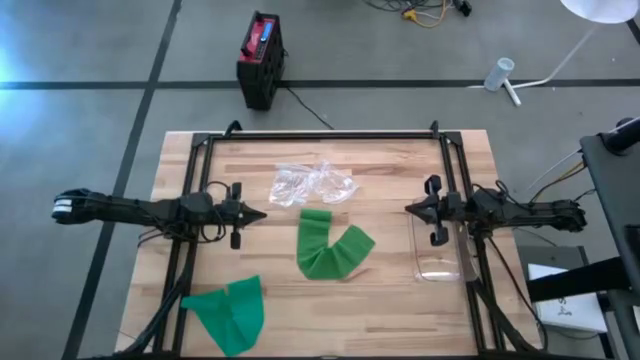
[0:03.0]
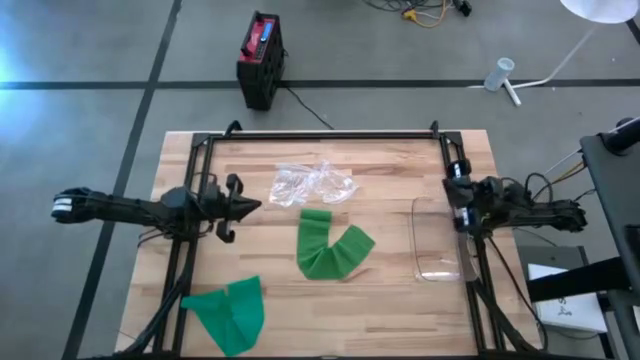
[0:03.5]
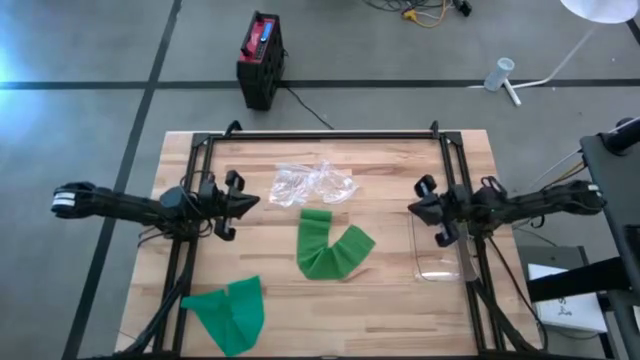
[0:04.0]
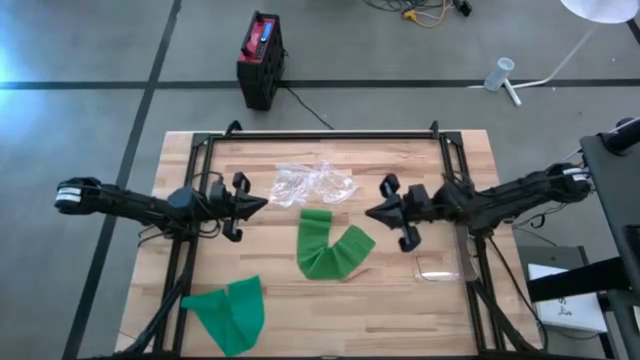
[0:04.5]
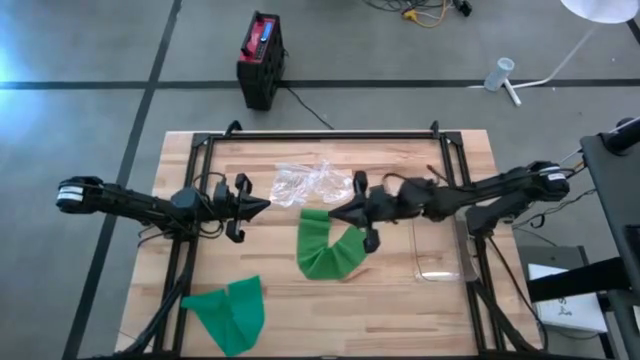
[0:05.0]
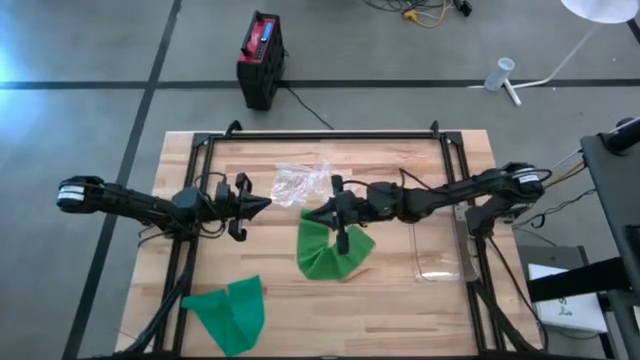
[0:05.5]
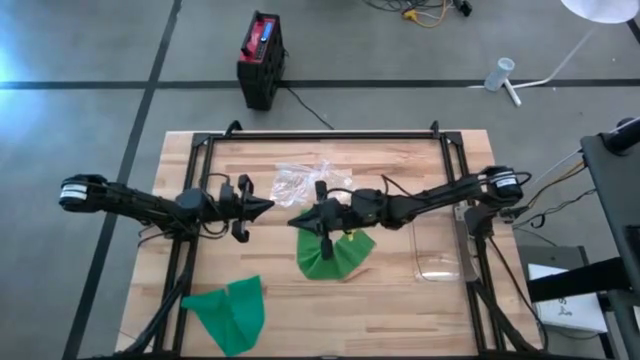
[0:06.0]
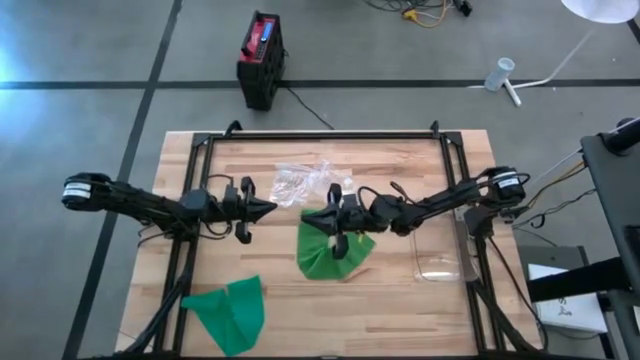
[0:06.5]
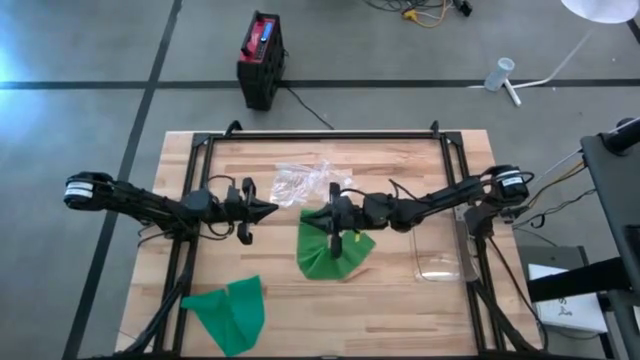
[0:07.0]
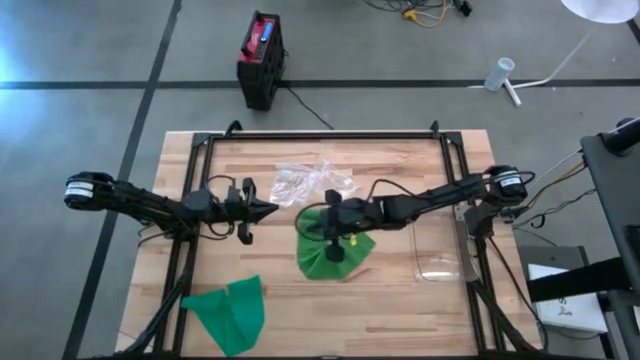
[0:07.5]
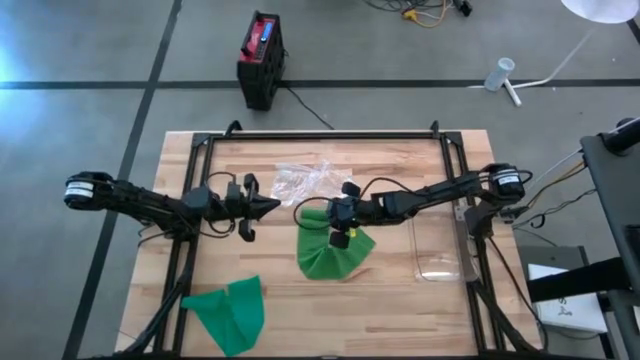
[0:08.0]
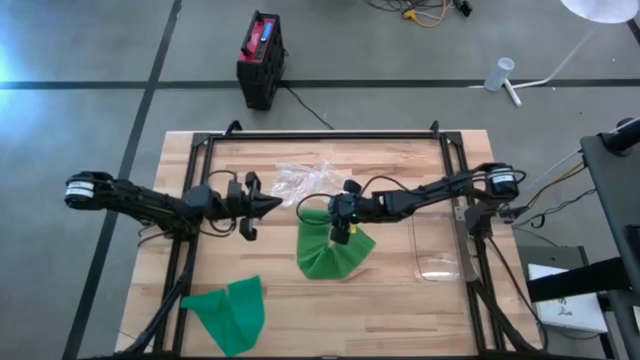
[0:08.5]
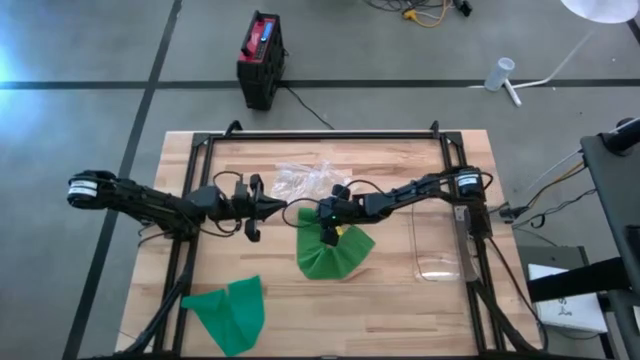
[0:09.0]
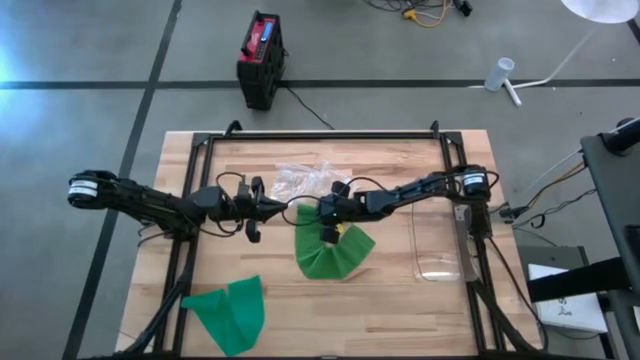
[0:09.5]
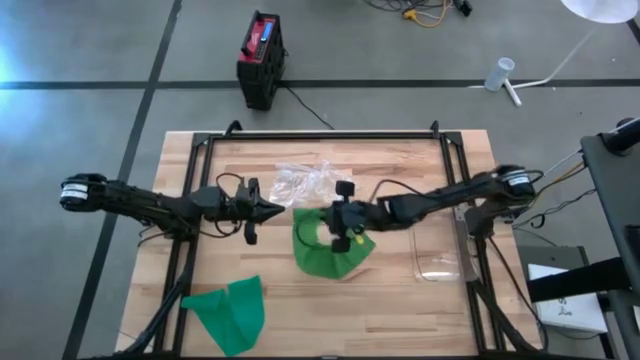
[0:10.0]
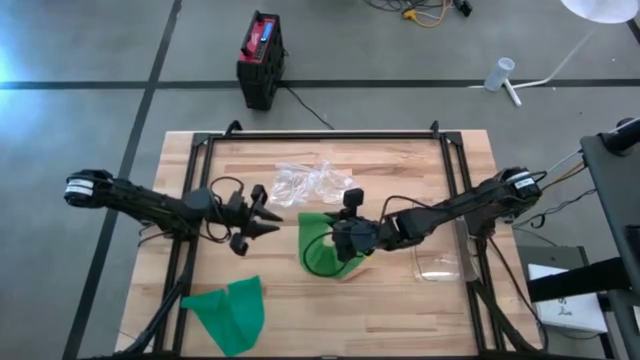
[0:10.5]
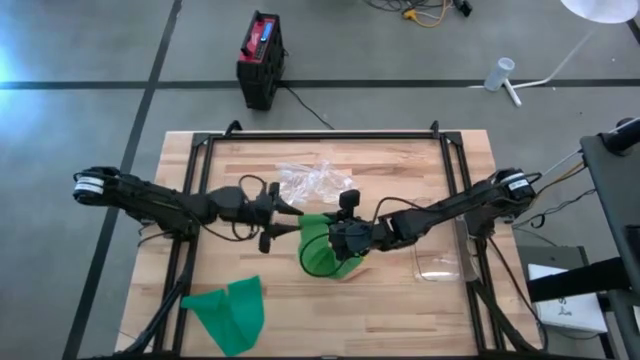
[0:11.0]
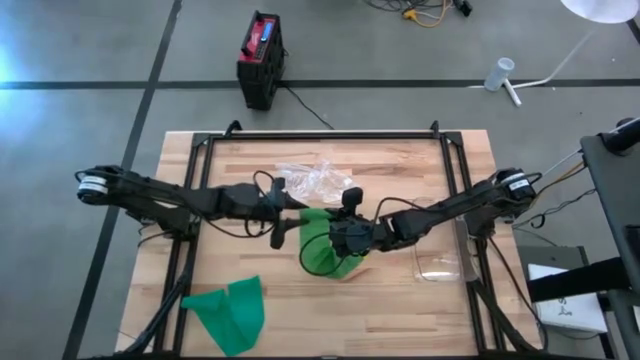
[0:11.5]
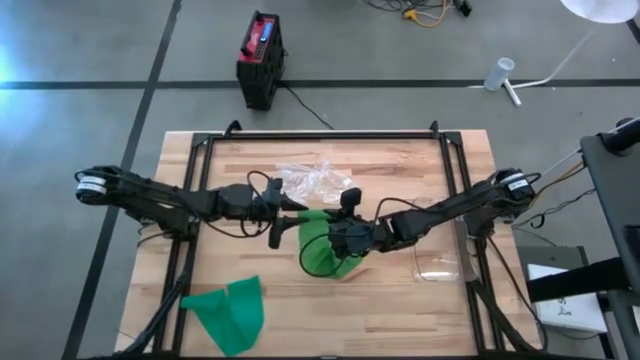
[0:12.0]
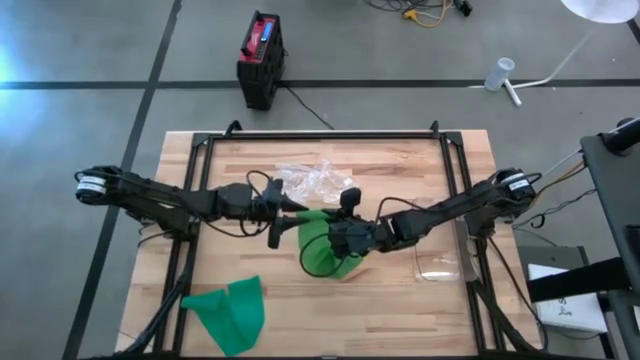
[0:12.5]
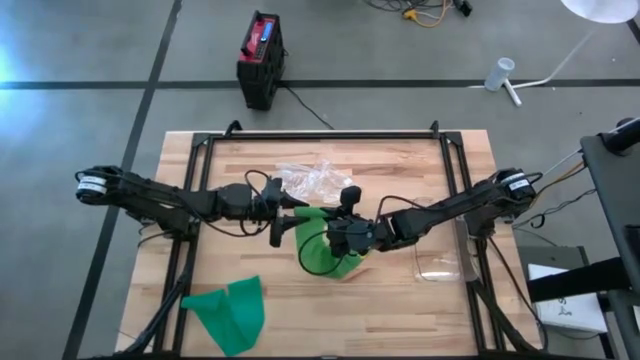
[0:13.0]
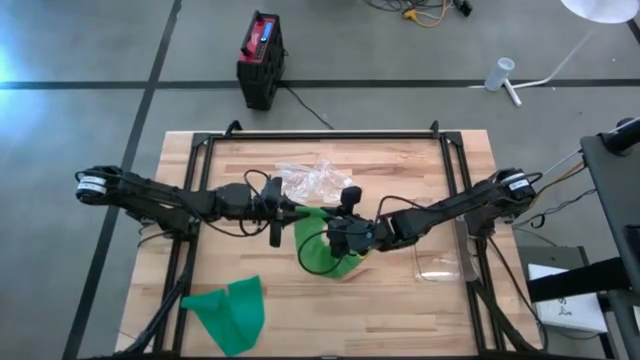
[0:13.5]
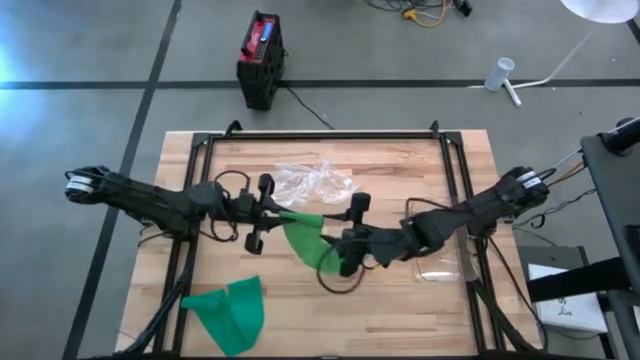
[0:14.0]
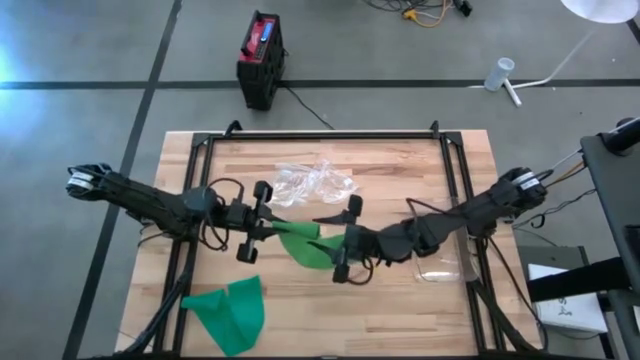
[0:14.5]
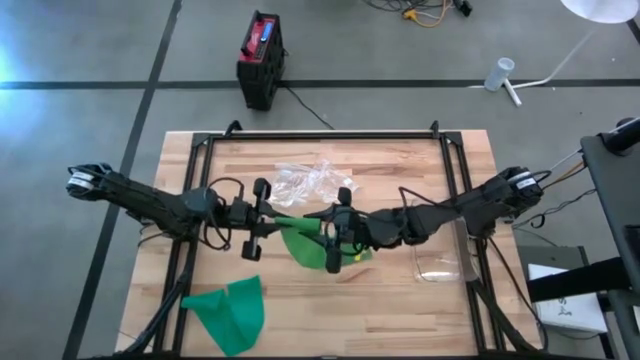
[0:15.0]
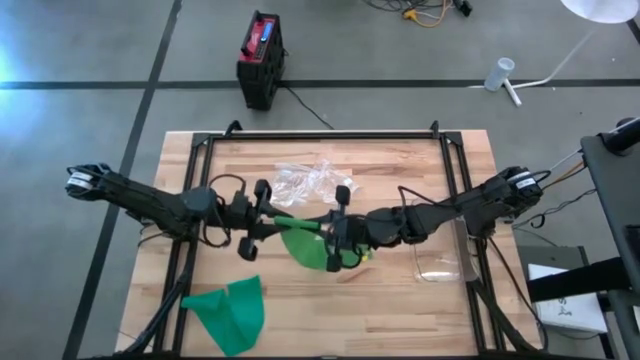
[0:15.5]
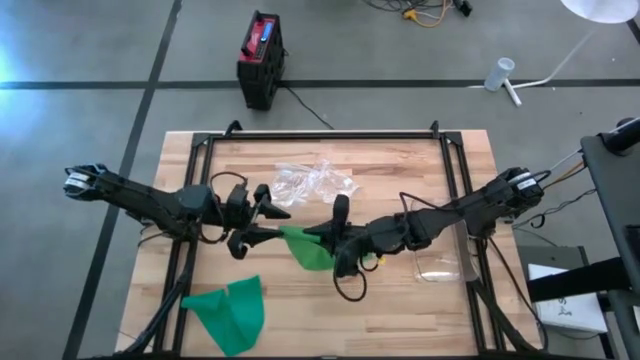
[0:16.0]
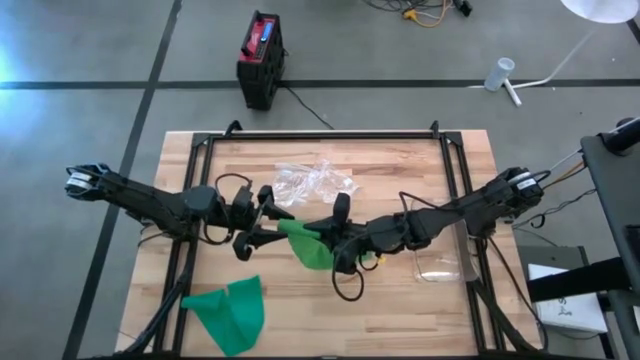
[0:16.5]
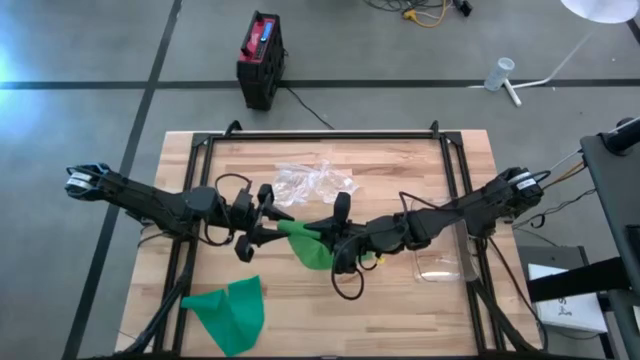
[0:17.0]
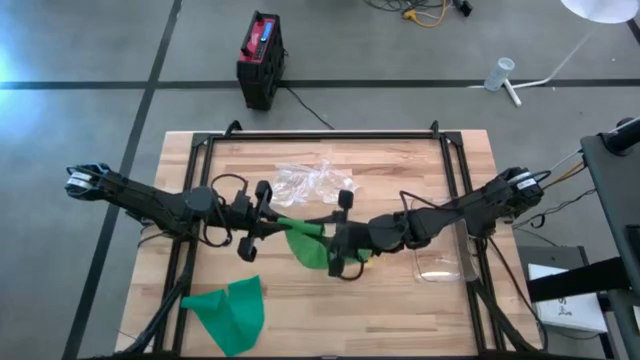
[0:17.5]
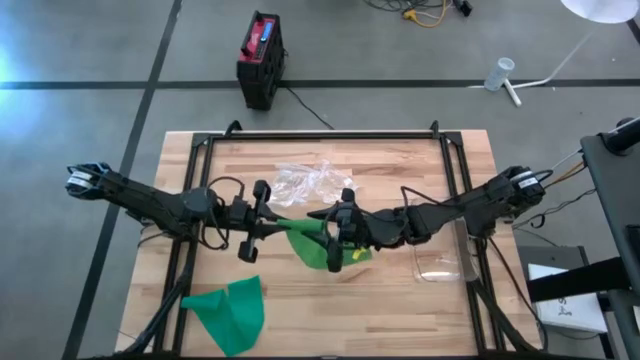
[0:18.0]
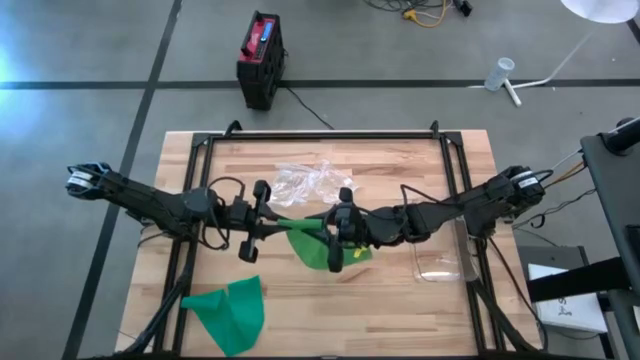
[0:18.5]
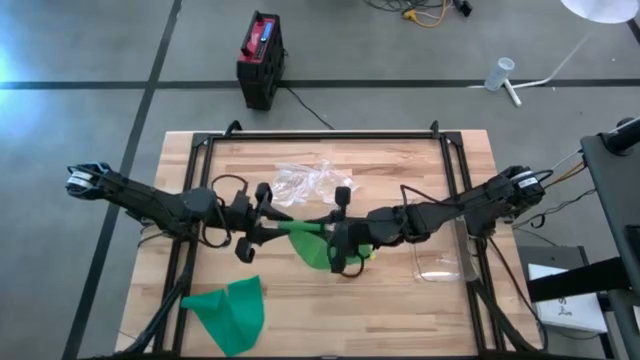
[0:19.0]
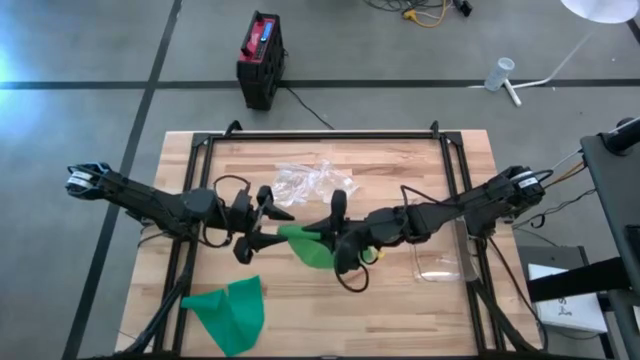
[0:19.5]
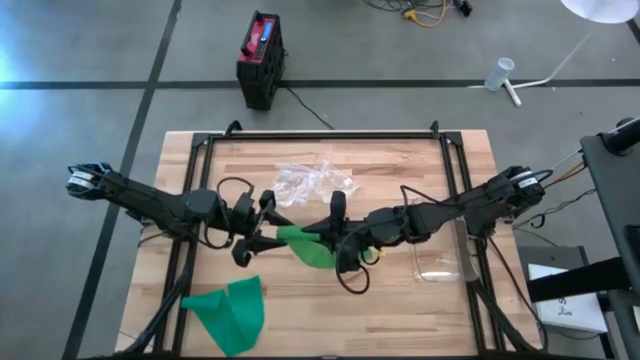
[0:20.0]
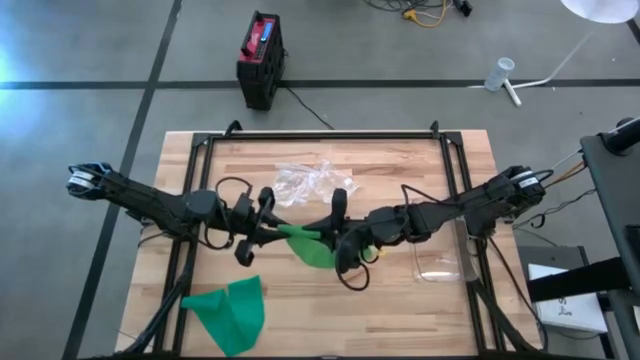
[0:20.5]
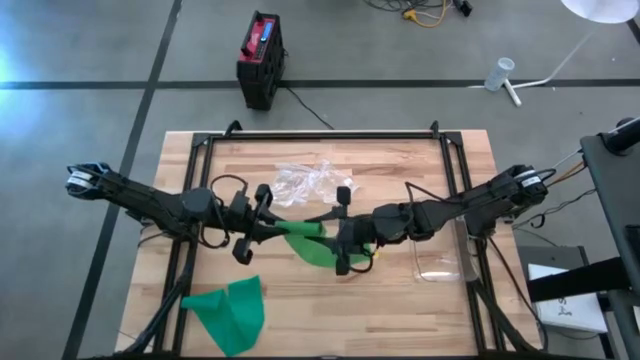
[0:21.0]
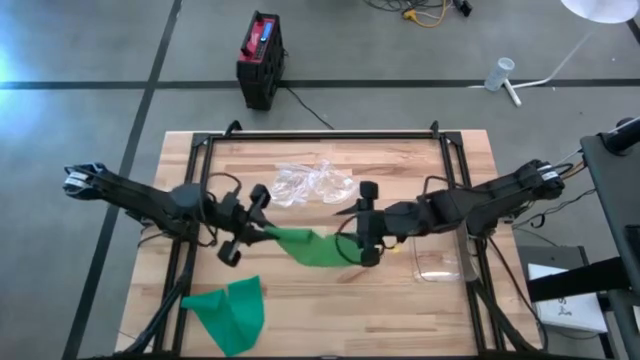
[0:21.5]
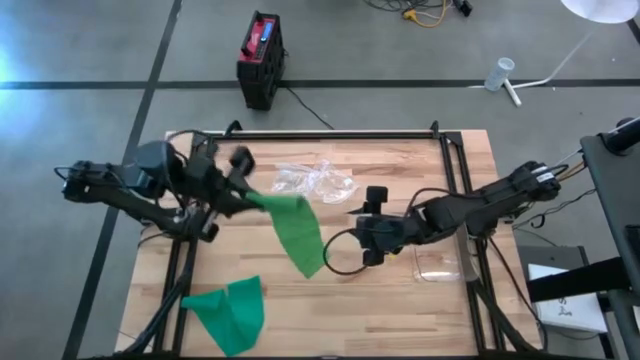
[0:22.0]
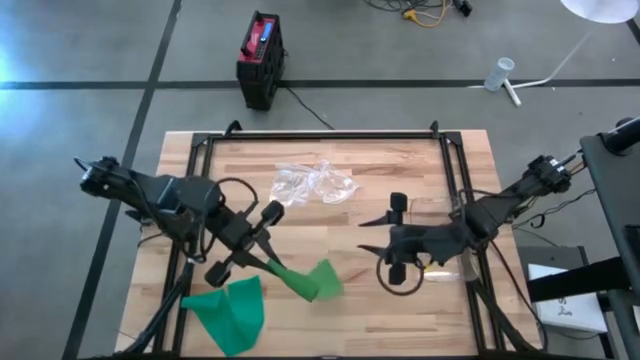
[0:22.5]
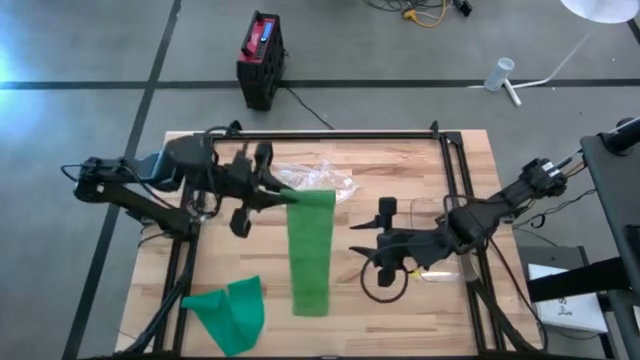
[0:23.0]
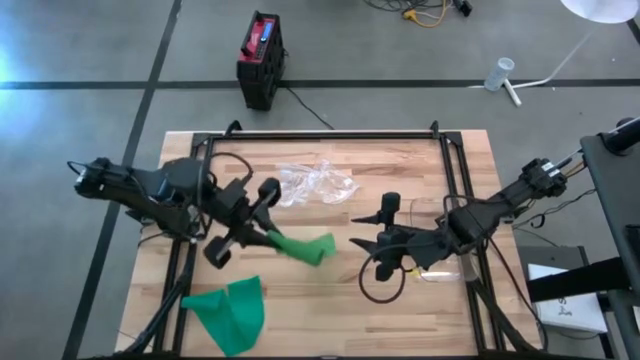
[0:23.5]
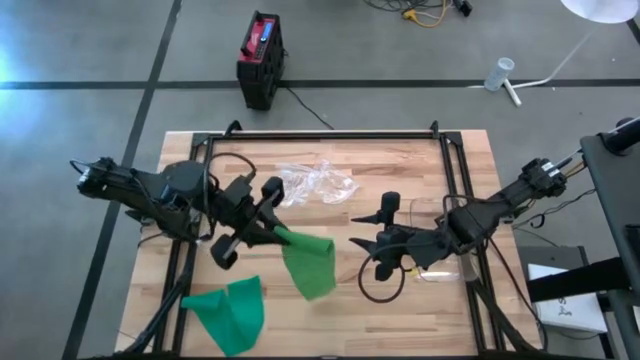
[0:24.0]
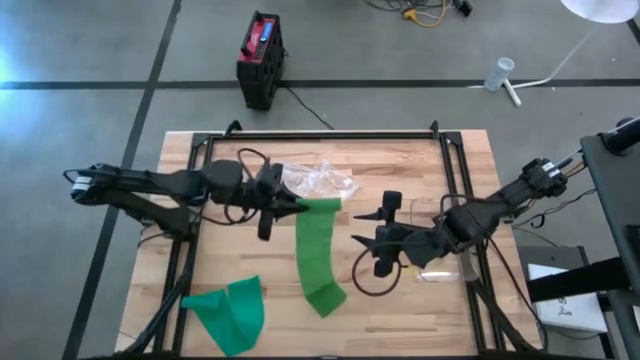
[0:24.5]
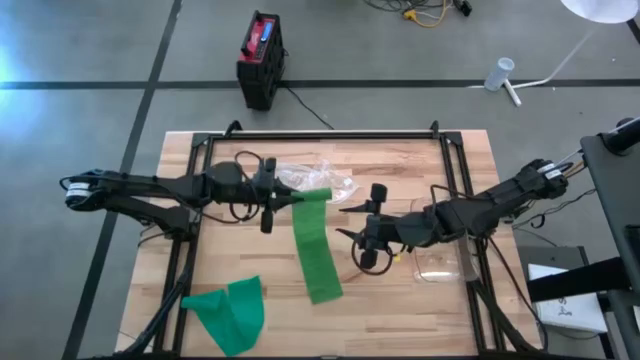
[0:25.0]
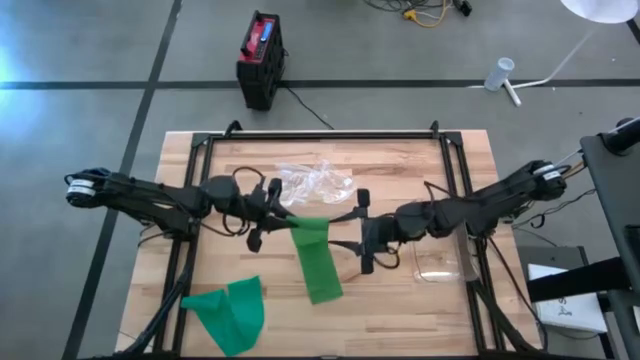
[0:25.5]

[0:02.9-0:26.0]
Task: Roll bandage
Roll the green bandage
